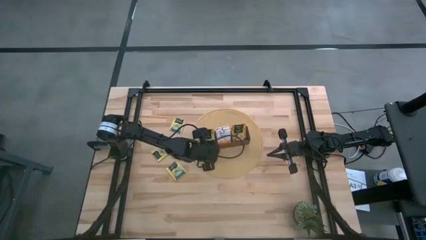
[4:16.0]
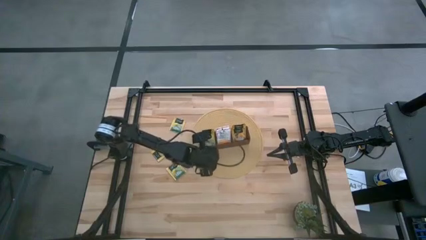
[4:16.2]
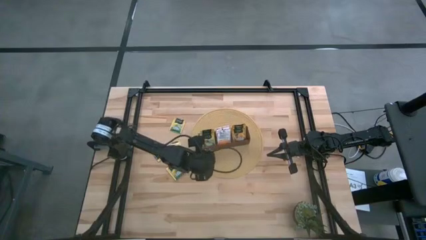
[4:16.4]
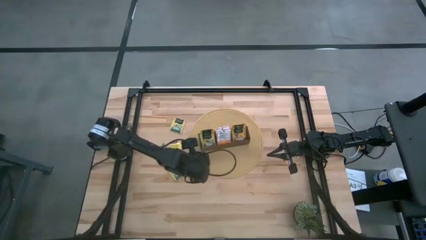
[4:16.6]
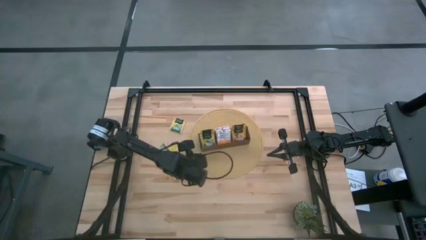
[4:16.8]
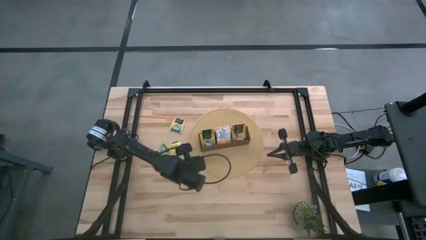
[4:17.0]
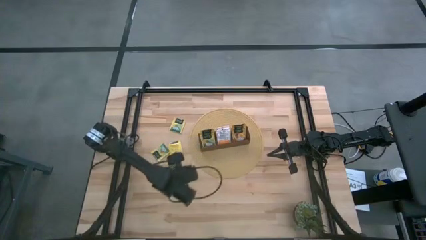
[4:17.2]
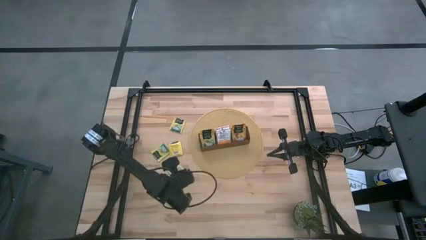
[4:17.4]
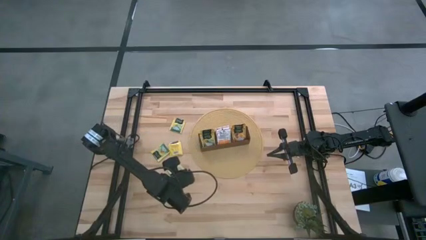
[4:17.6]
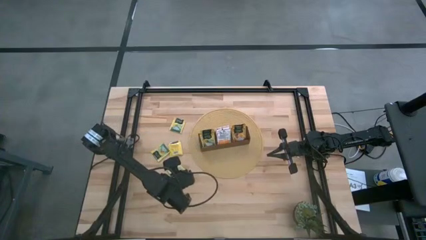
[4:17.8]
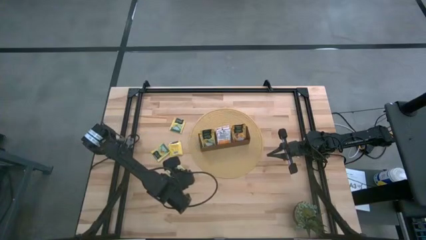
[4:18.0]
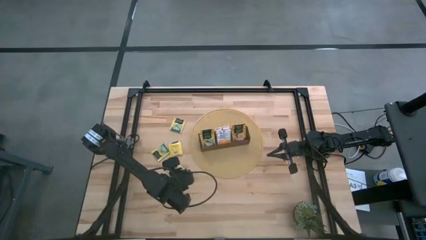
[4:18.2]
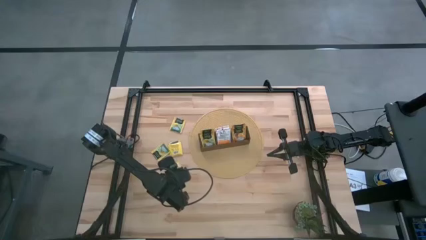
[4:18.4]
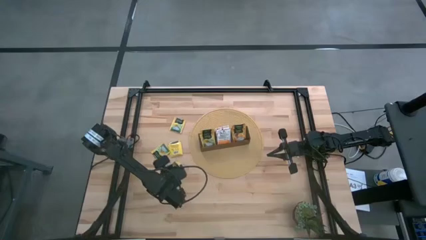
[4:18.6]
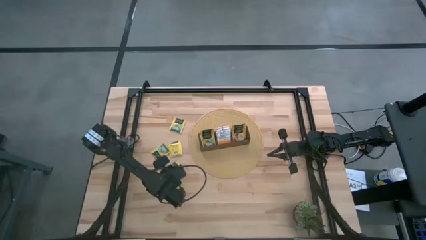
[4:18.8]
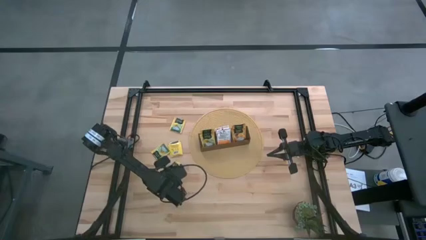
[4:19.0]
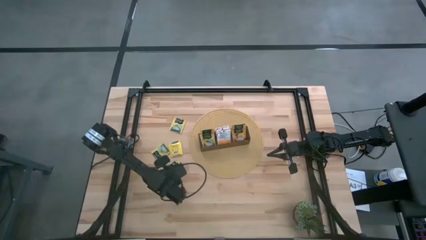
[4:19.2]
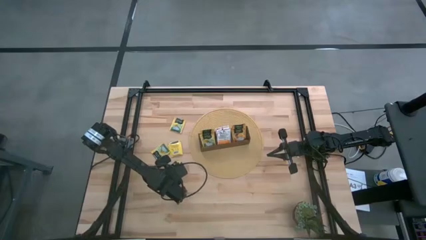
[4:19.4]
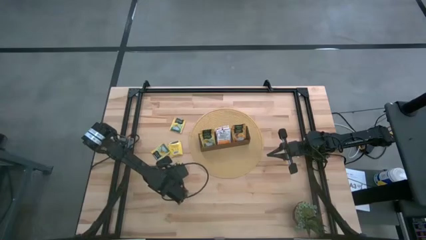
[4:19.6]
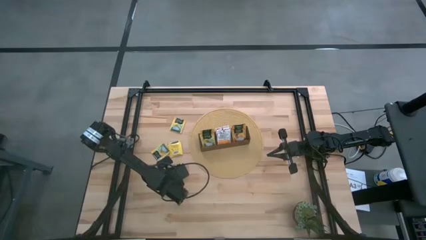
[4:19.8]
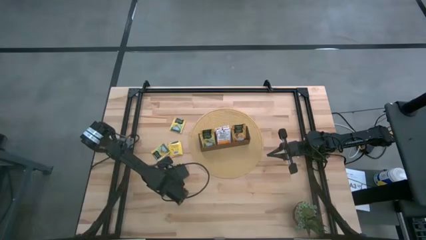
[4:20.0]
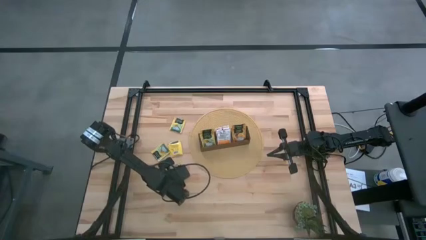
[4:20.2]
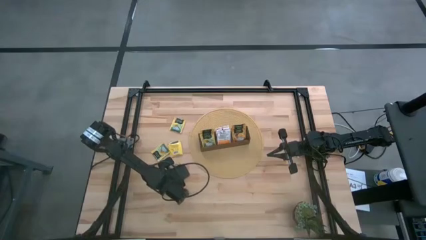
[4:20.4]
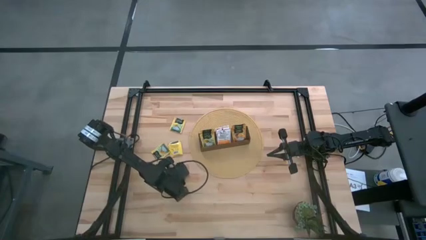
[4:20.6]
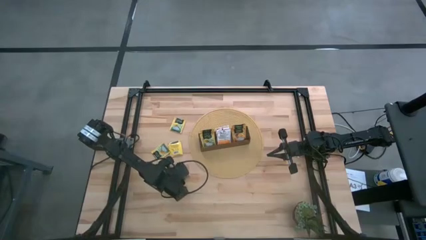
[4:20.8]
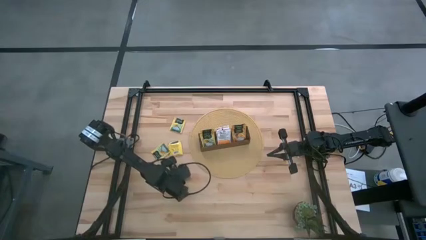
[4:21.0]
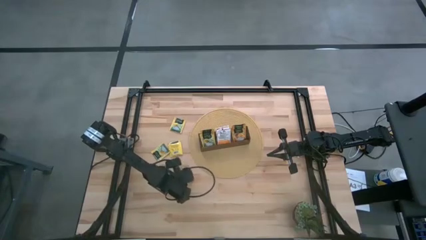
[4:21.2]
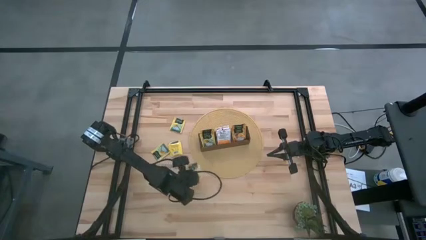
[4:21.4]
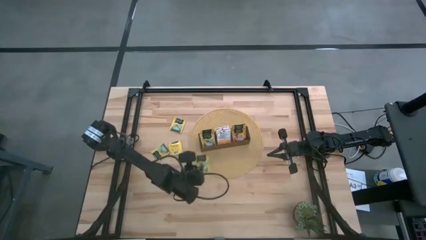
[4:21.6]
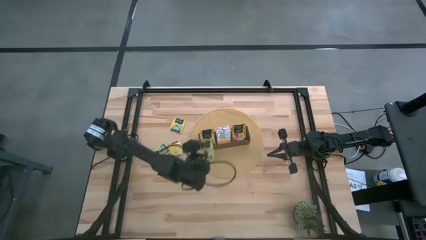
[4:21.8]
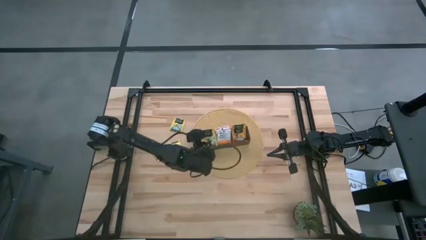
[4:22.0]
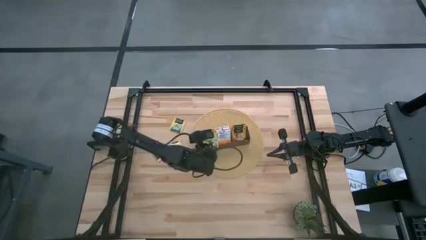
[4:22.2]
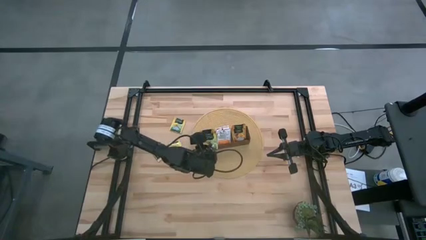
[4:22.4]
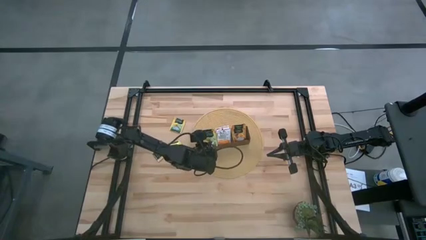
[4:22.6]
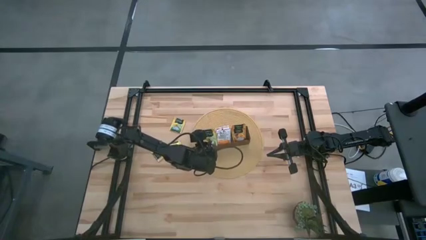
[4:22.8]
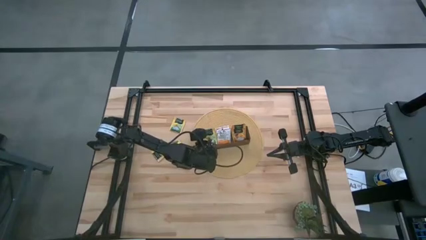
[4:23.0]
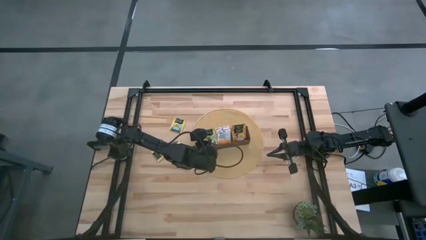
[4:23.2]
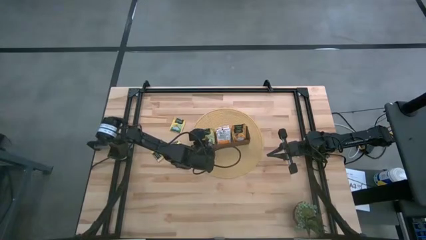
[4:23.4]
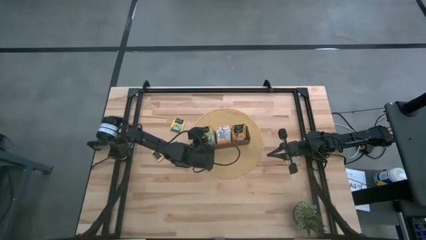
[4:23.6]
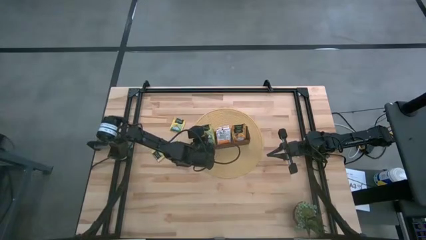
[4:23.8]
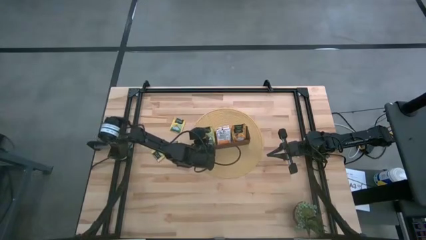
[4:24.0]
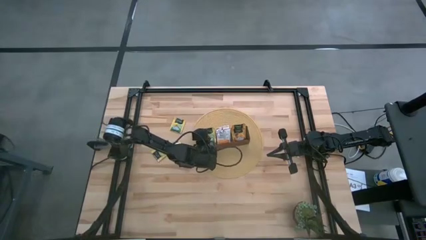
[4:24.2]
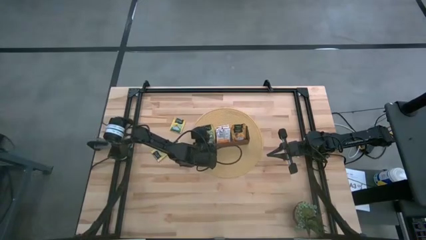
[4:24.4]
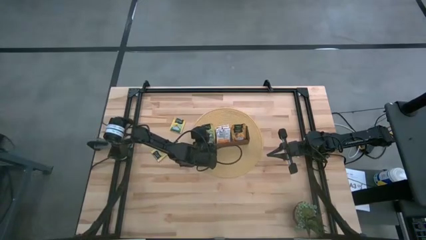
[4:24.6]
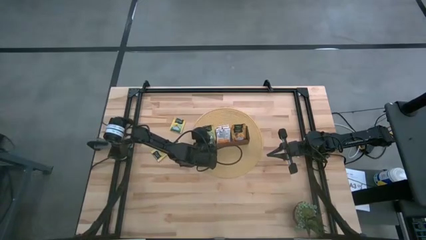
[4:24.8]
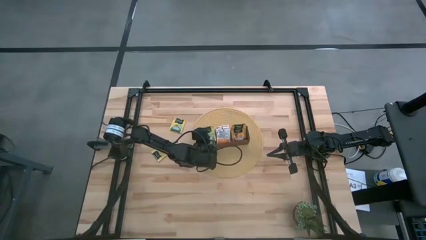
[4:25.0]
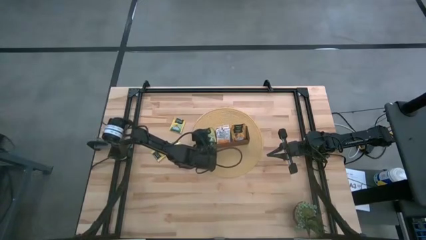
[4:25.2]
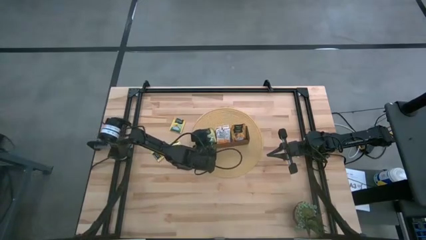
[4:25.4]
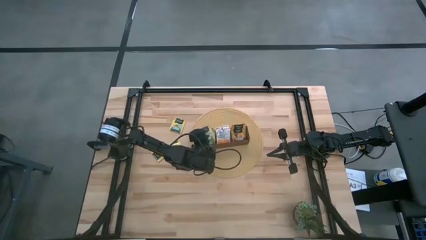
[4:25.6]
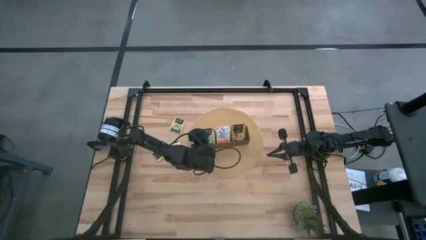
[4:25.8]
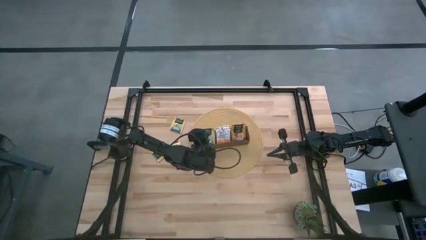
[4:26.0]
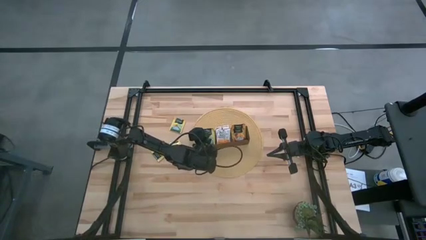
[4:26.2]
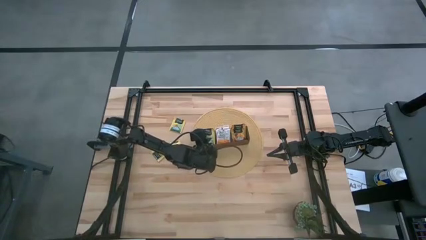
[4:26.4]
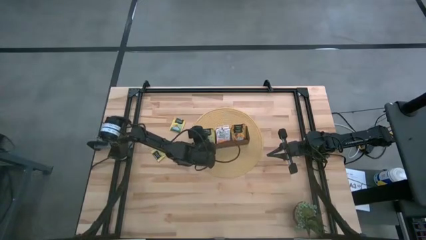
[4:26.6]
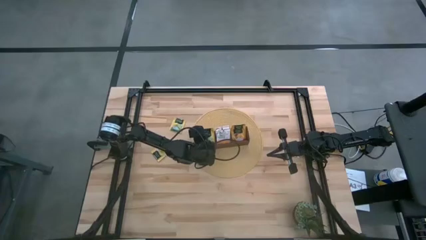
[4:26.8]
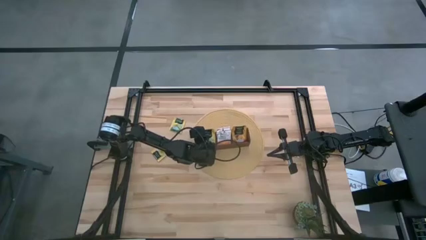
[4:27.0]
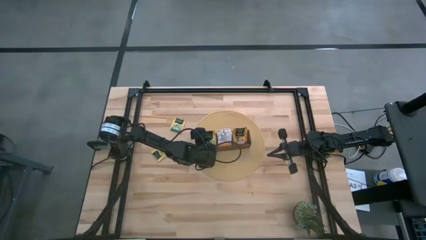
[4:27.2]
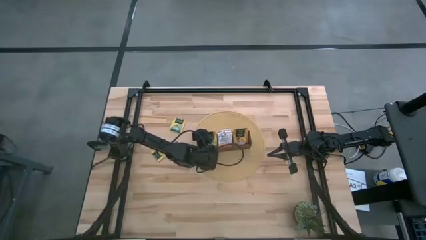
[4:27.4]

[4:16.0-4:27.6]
Task: Pick & Place Tea
Put the yellow tea bag into the left section of the wooden organizer

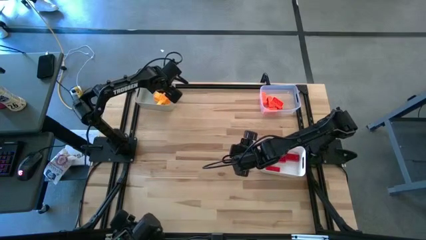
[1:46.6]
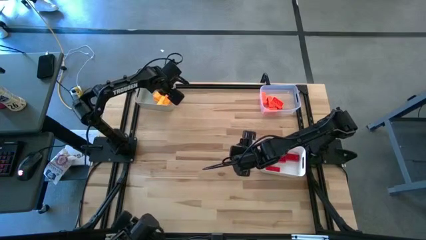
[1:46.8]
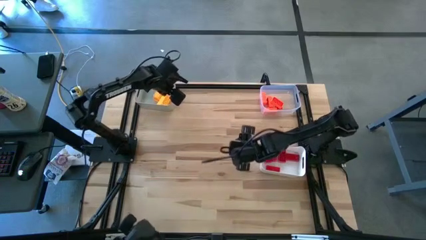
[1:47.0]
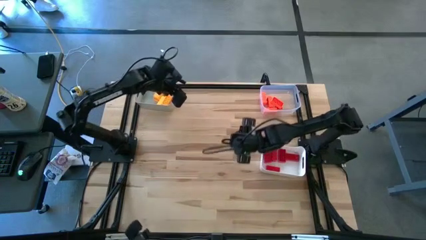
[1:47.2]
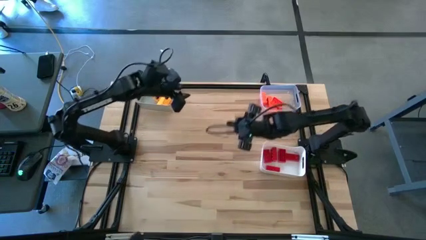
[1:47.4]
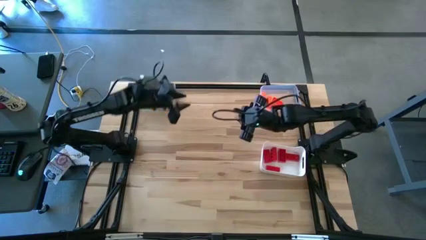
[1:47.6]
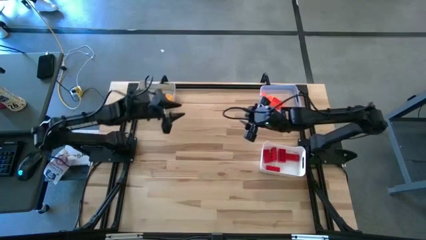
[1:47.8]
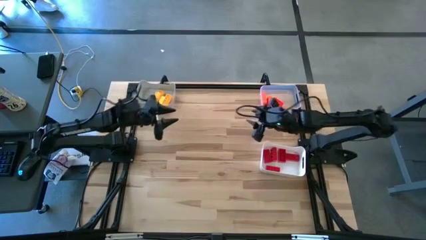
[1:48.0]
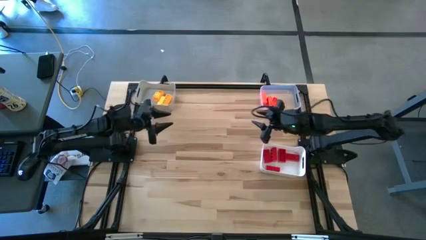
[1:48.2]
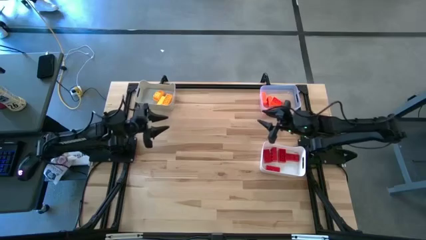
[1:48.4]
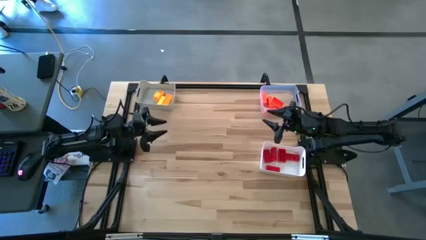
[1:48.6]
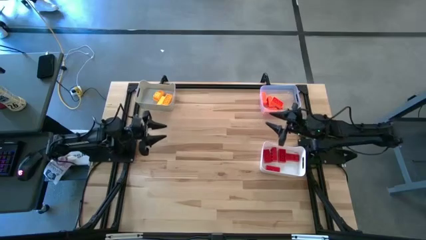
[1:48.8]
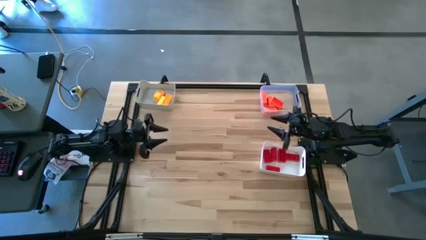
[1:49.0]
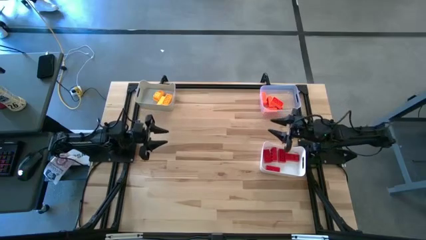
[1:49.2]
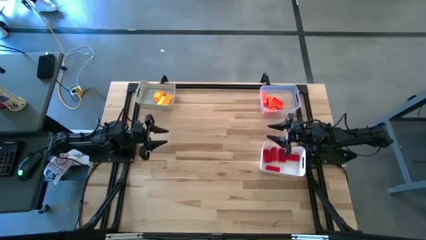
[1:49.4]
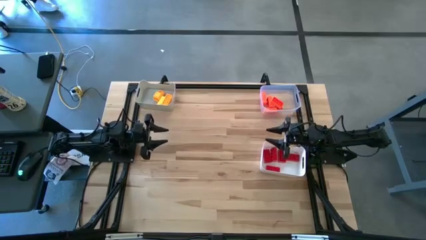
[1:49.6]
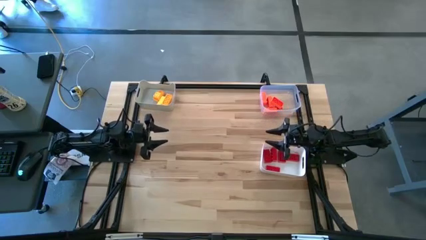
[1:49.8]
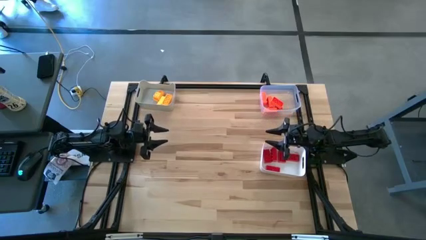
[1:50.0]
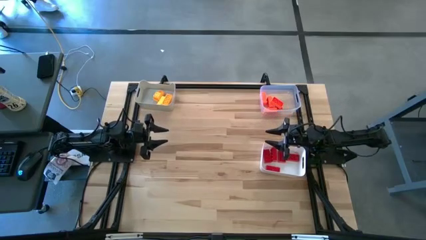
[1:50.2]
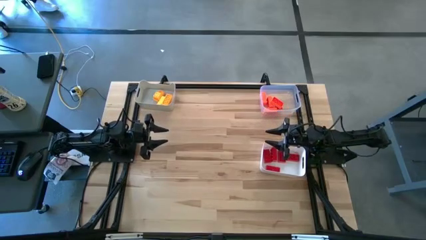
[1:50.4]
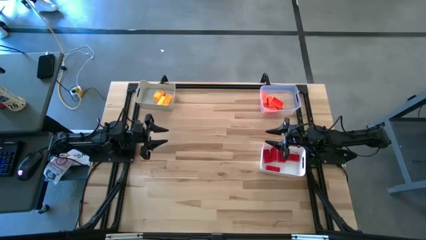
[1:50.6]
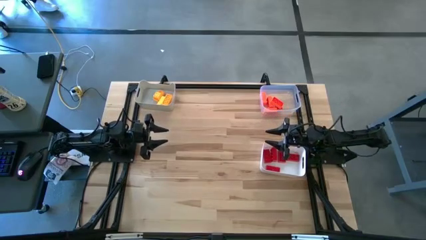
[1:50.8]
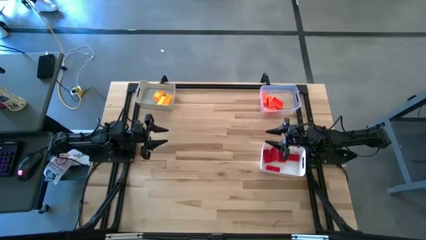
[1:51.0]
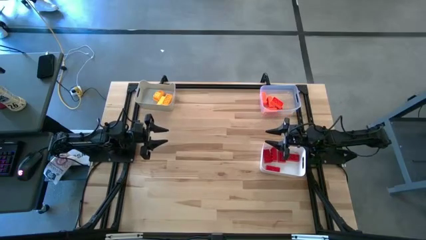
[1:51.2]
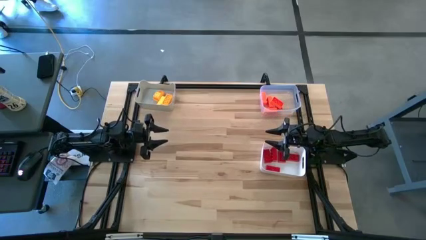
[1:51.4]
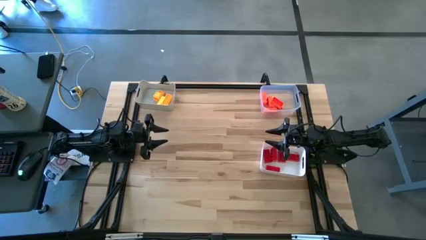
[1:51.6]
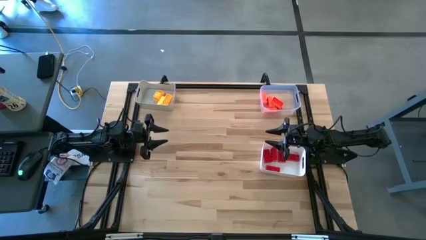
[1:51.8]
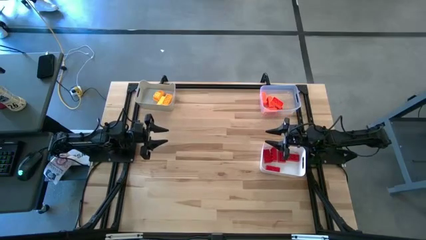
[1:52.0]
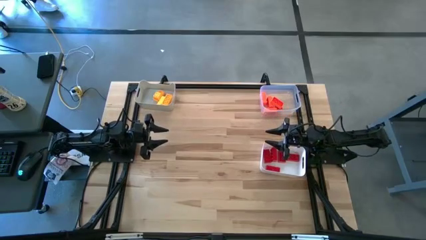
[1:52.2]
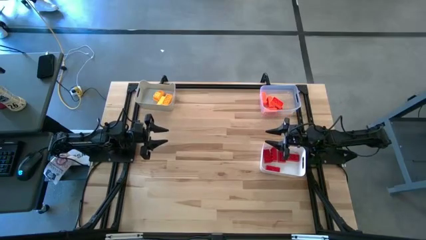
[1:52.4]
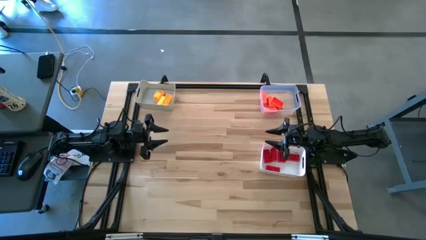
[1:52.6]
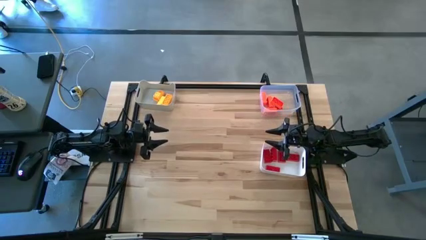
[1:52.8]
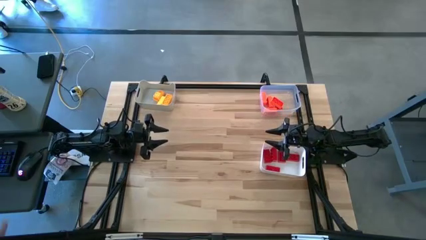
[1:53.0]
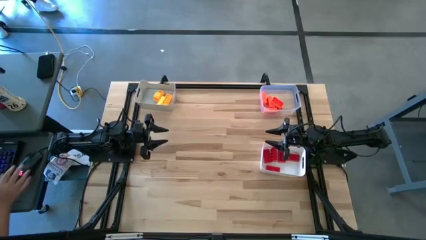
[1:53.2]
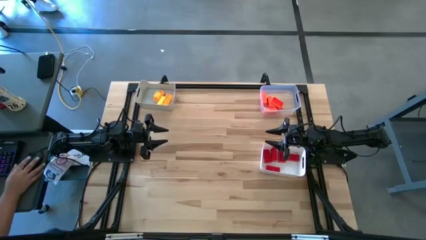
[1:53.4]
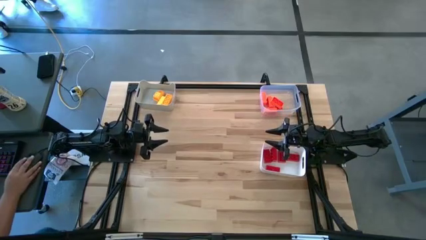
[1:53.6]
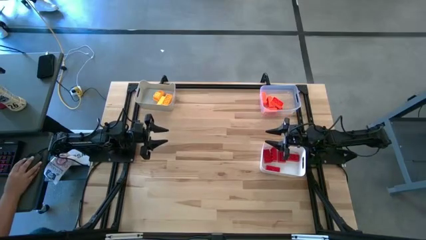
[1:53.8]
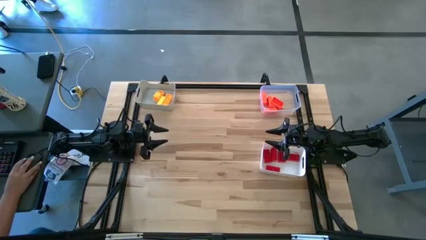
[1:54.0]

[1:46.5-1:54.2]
Task: Sort & place blocks by color
Return to Home Position
